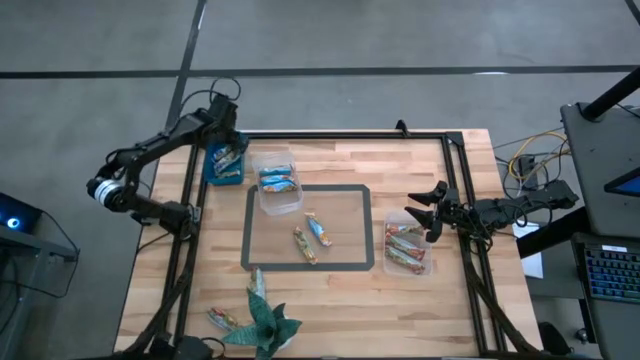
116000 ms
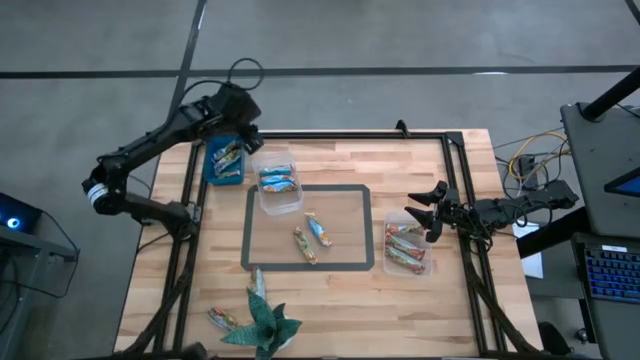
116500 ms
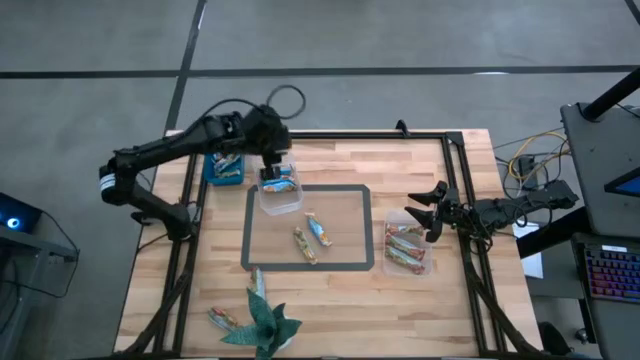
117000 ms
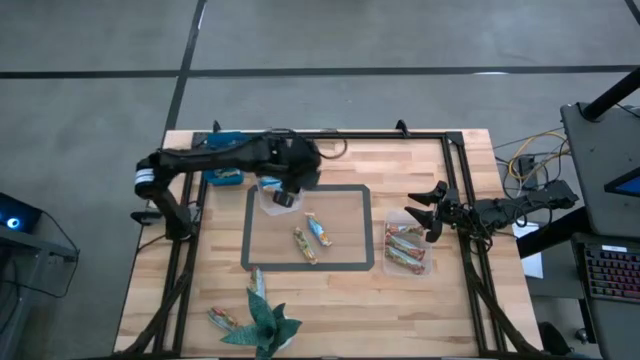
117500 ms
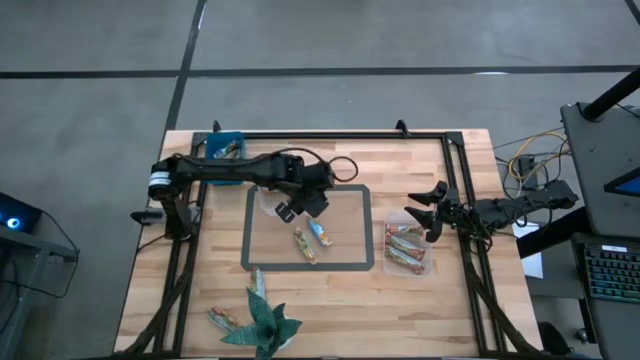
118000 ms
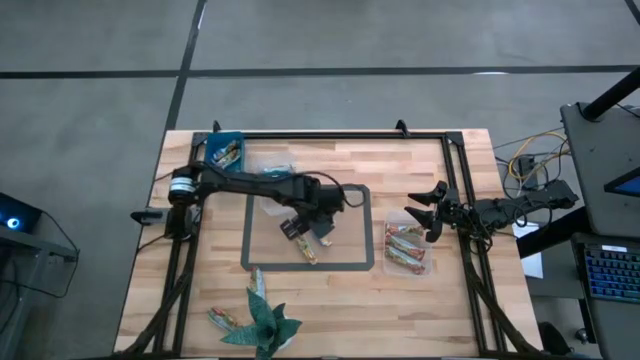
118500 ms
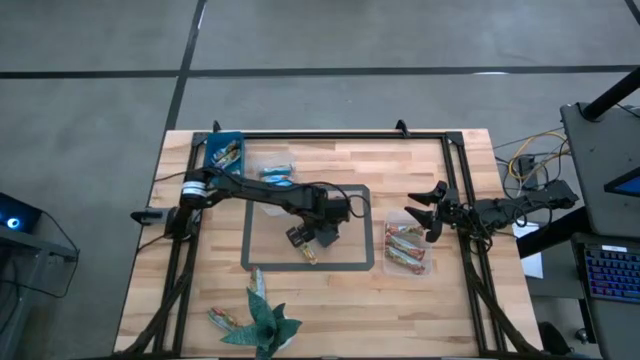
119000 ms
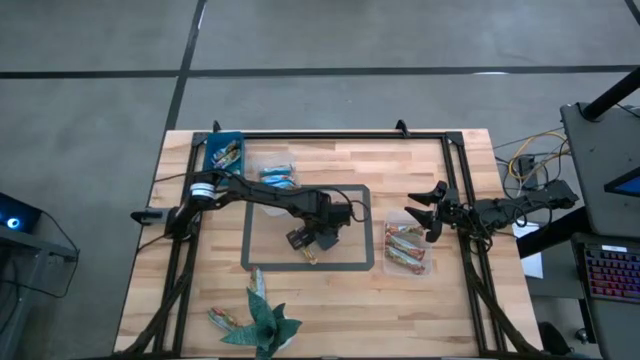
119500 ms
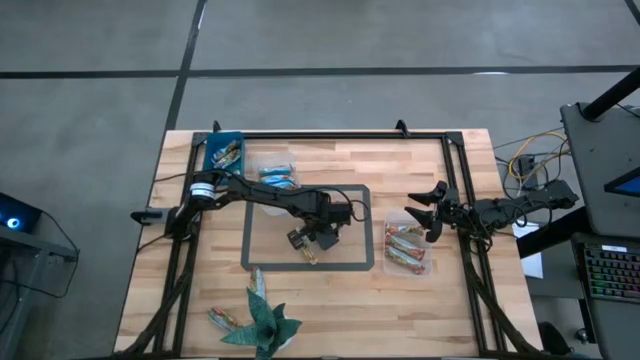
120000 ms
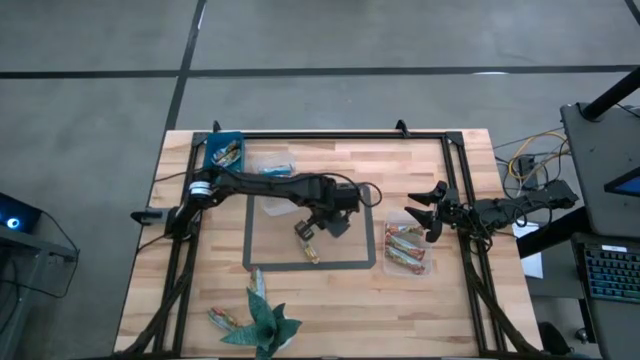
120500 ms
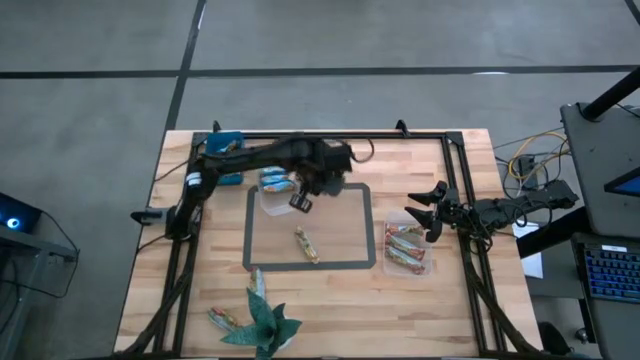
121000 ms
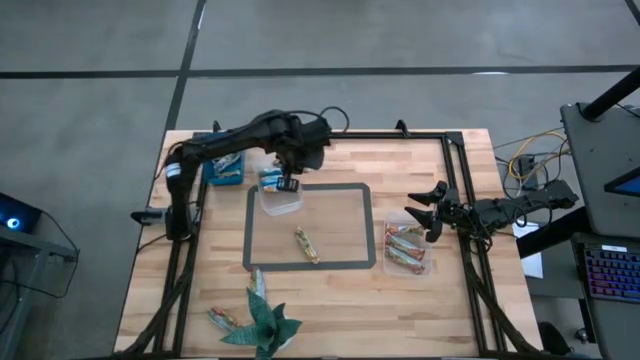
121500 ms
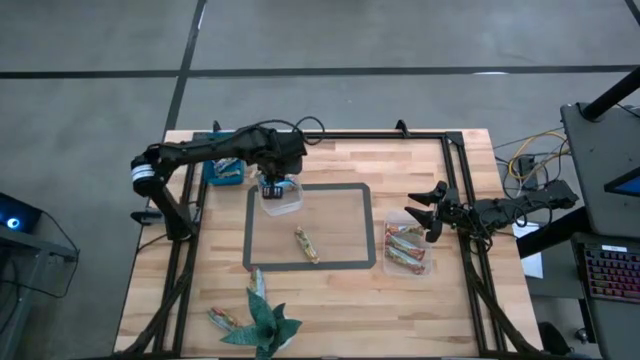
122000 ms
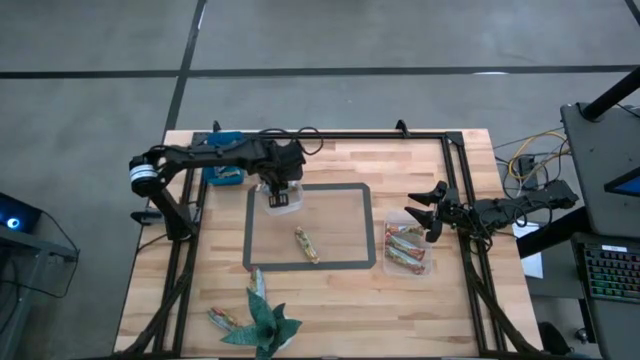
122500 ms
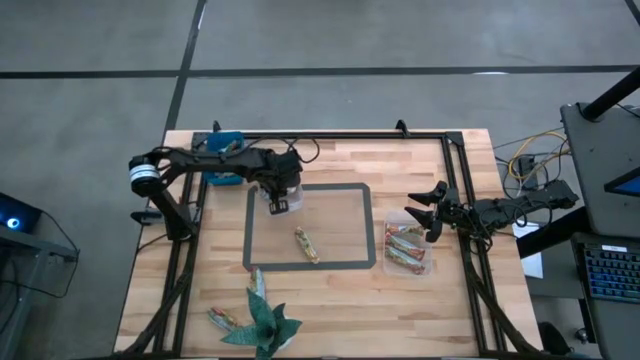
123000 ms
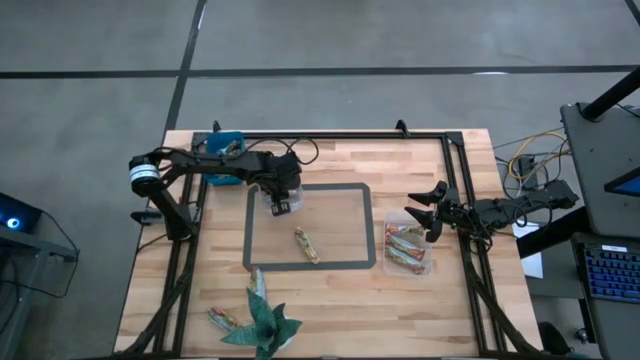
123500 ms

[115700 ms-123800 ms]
Task: Pick and place Granola Bars by type
Put the yellow granola bar into the left transparent bin

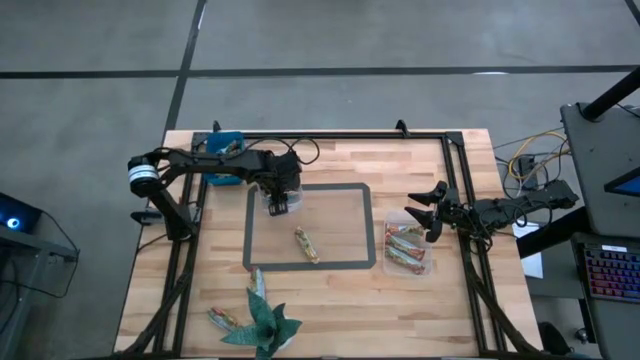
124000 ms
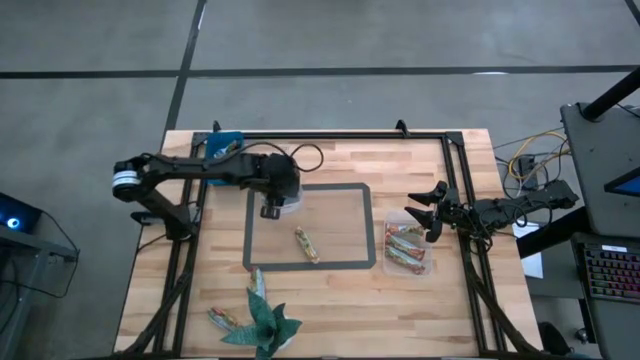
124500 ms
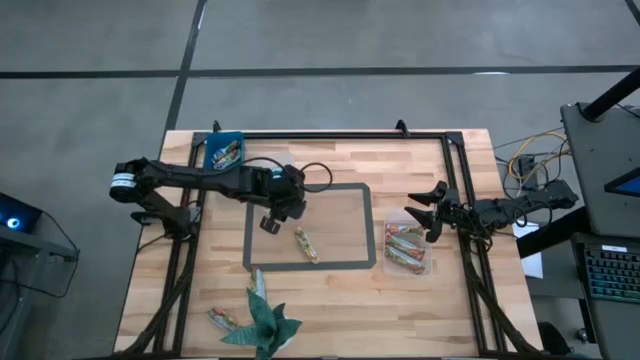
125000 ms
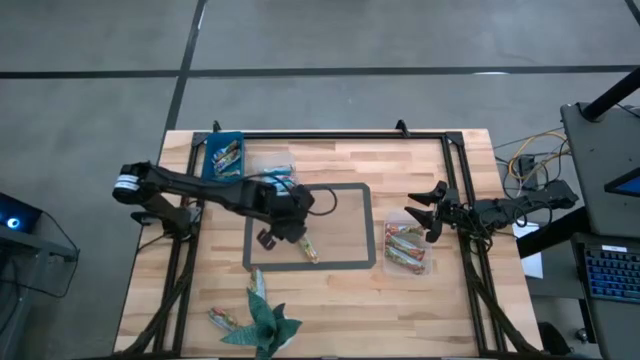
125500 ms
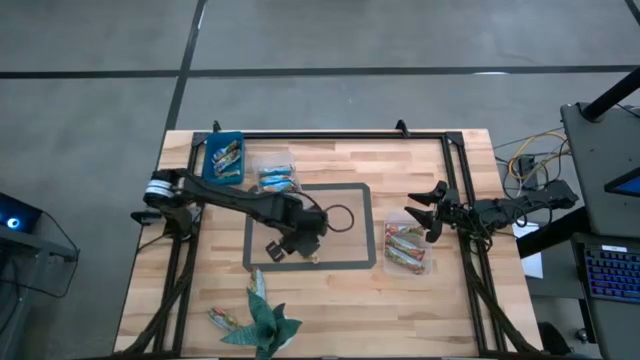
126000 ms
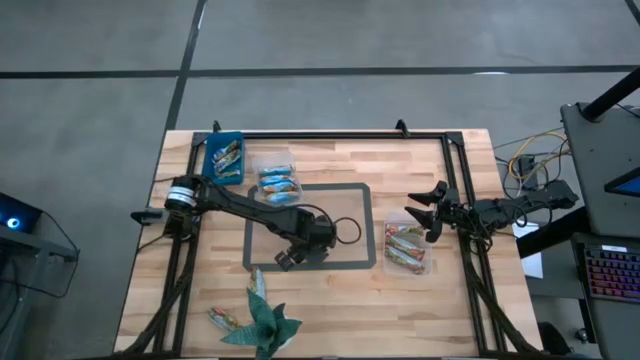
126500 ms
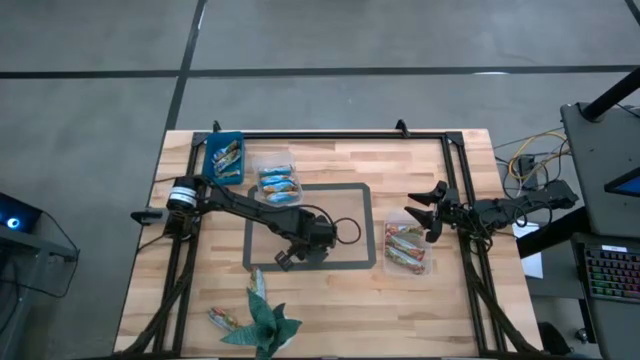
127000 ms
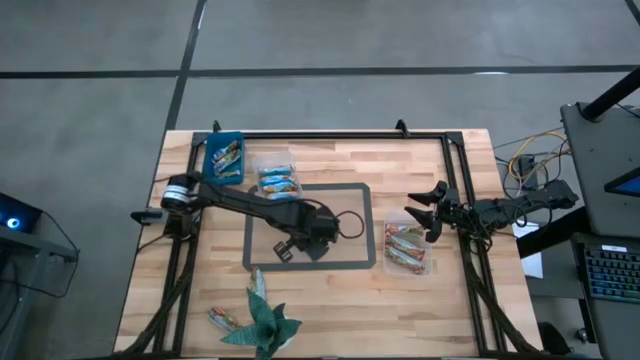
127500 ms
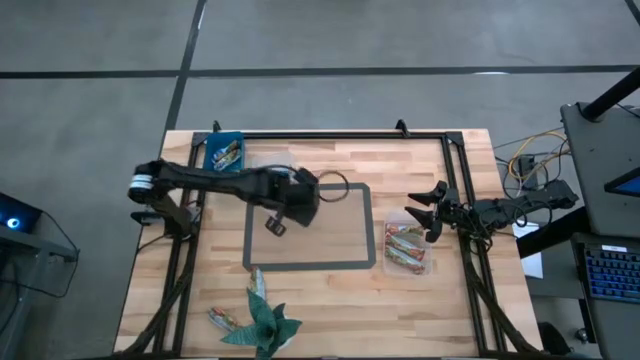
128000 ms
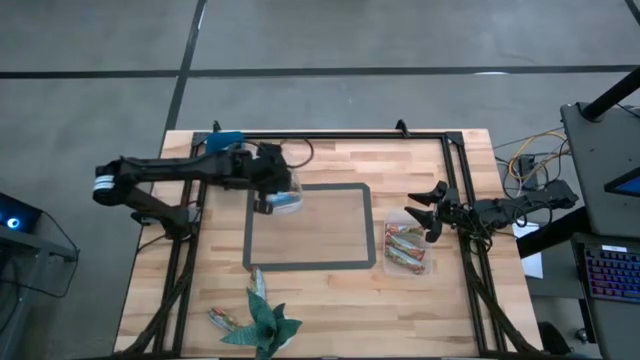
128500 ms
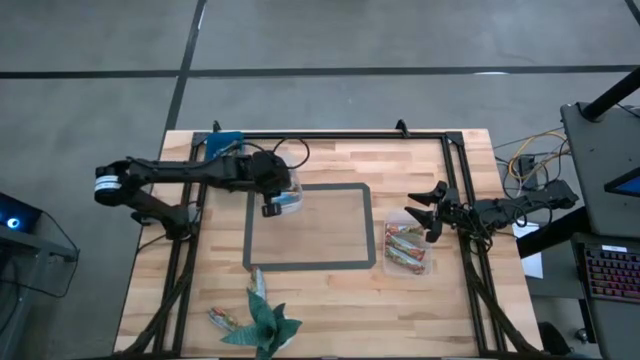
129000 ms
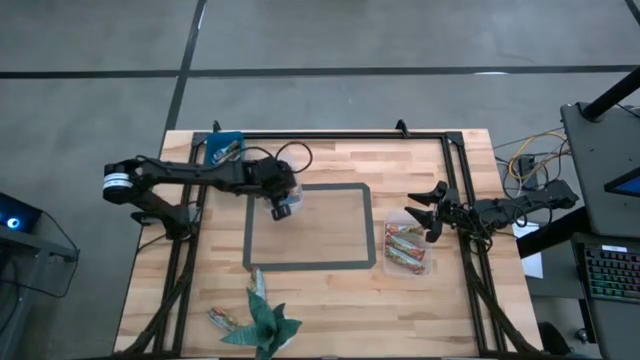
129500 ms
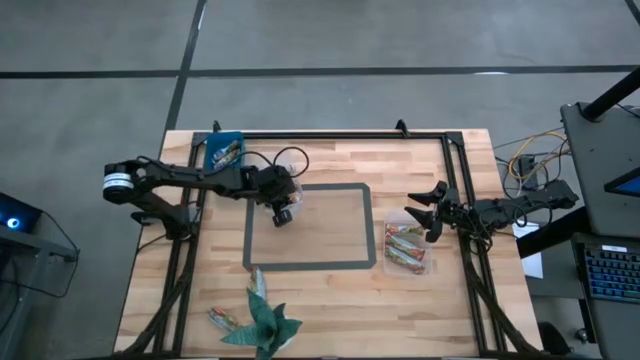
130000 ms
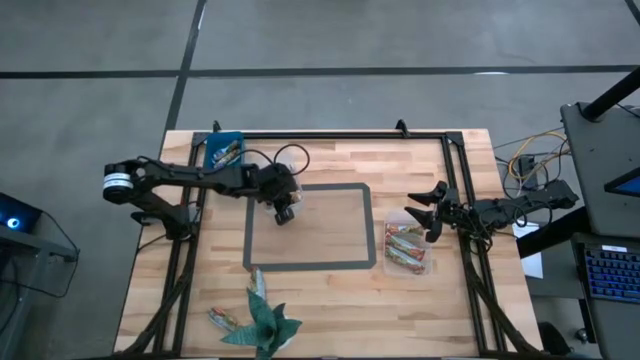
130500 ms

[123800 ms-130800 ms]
Put the yellow granola bar into the left transparent bin

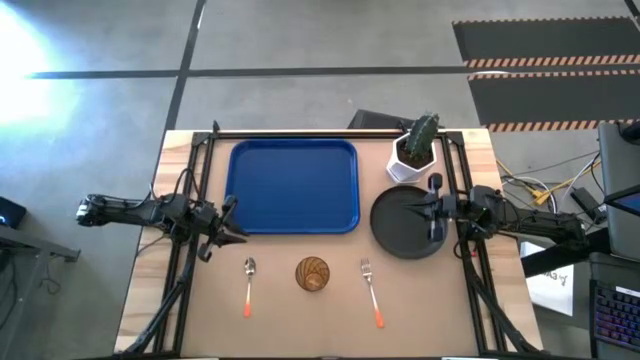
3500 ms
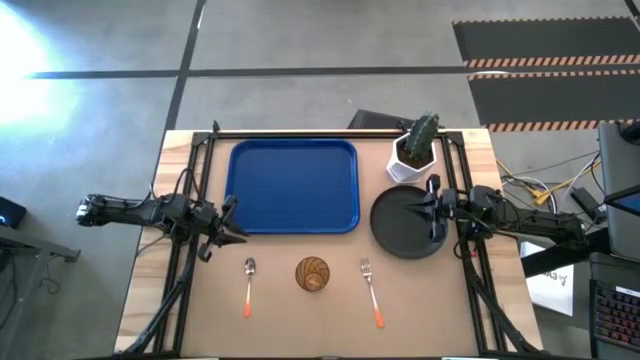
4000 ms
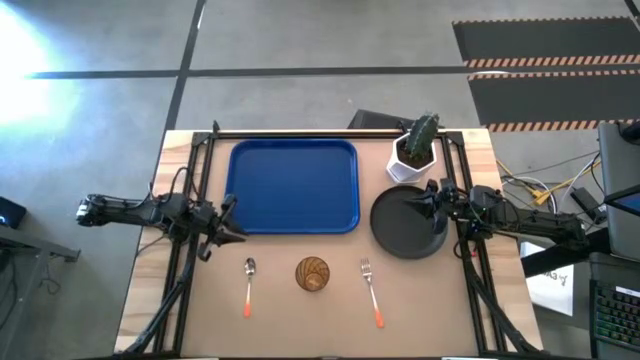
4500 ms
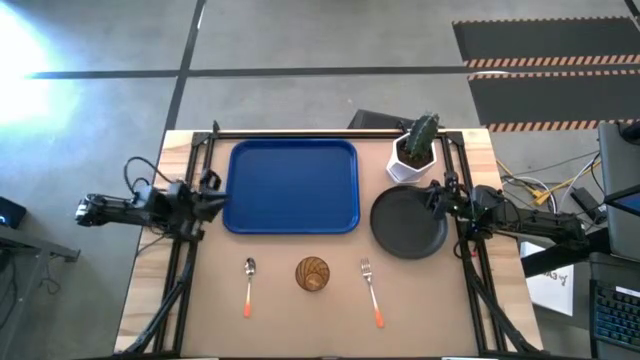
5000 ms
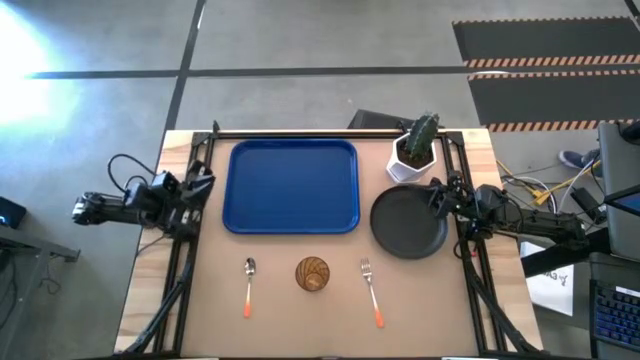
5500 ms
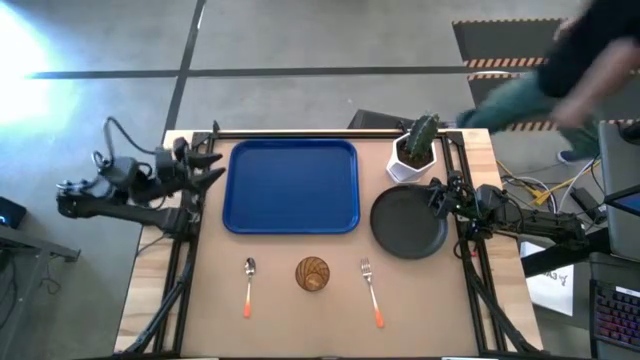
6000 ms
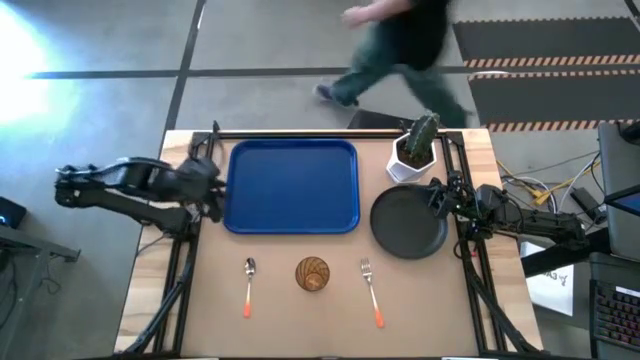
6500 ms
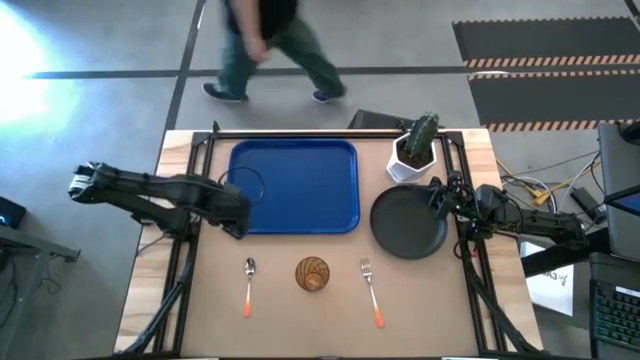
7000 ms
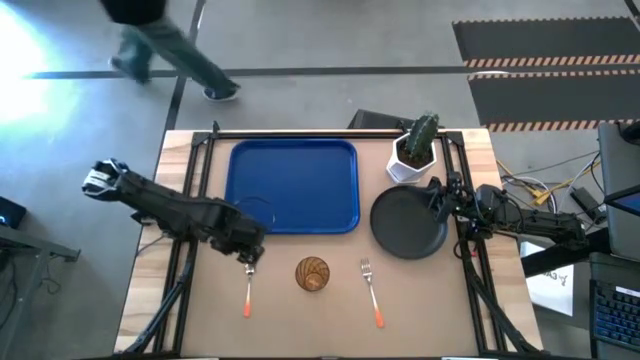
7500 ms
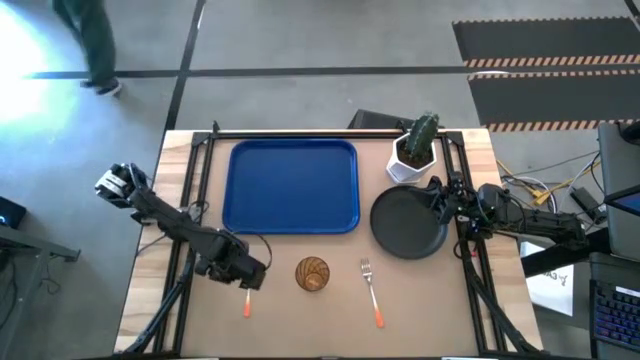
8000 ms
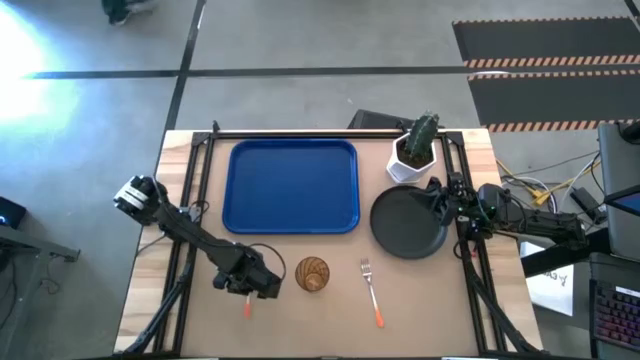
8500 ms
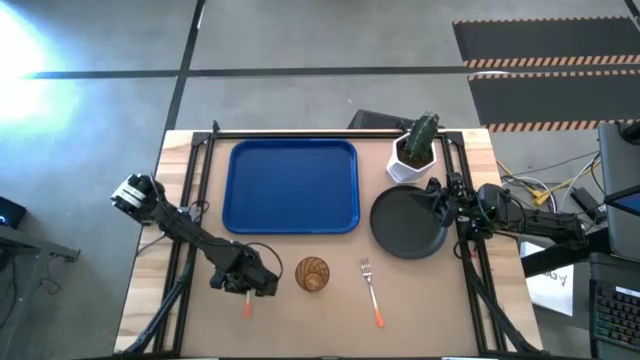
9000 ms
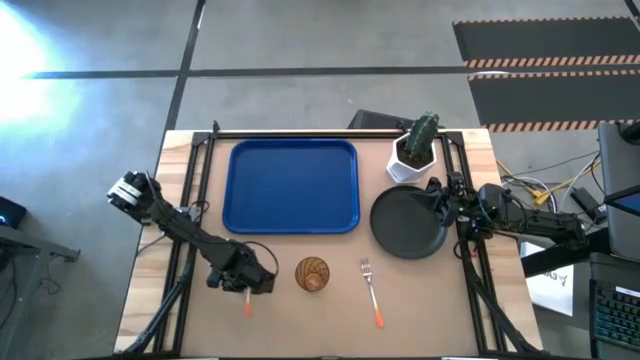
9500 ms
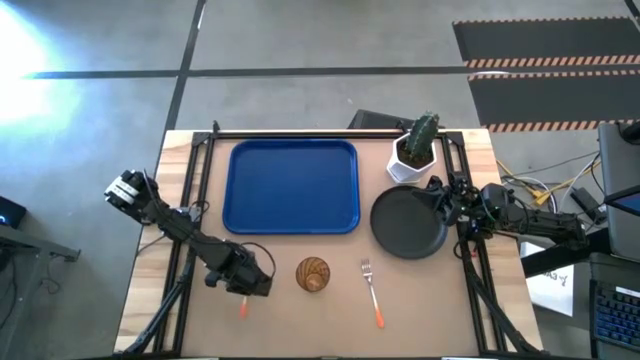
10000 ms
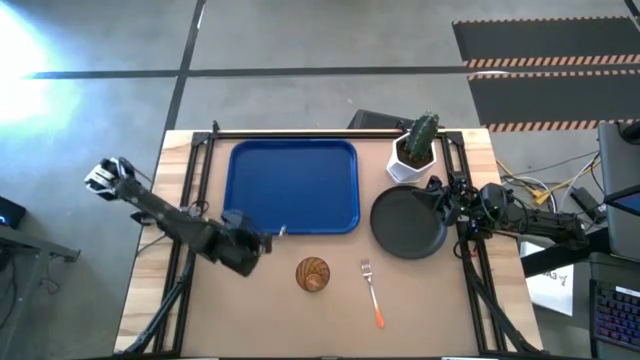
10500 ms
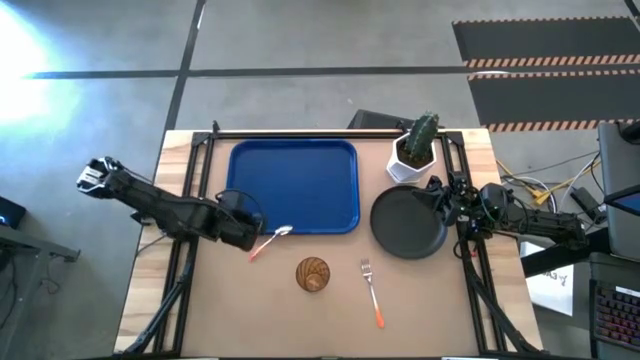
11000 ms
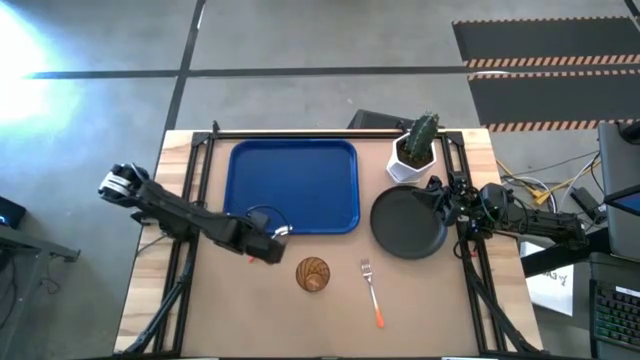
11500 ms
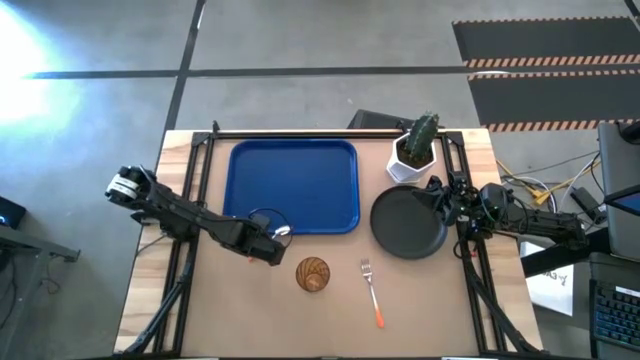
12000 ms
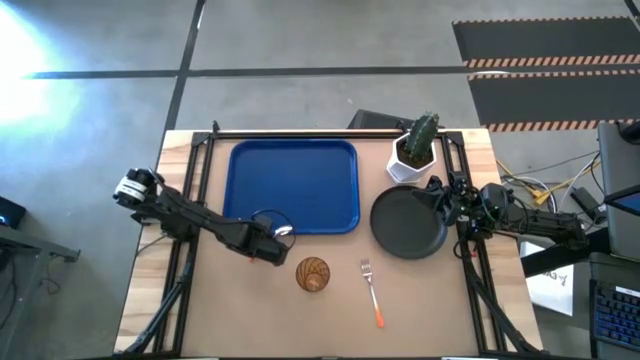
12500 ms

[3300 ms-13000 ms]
Task: Pick and place plate/cup/fork/spoon on tray
Put the orange spoon on the blue tray
